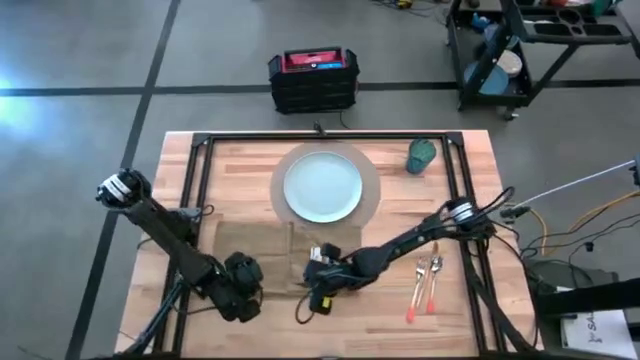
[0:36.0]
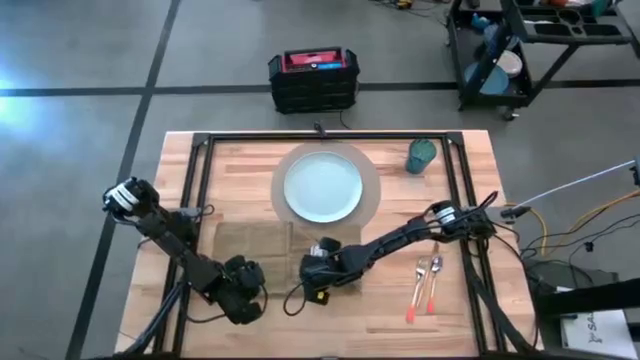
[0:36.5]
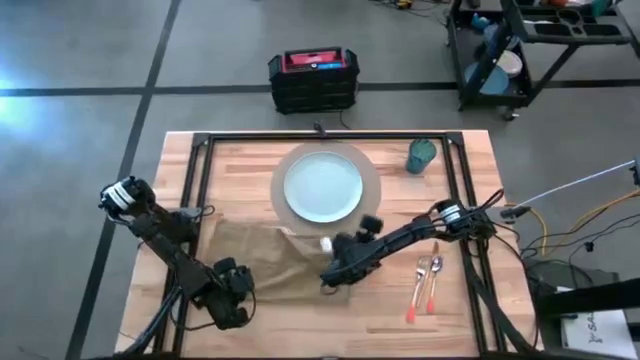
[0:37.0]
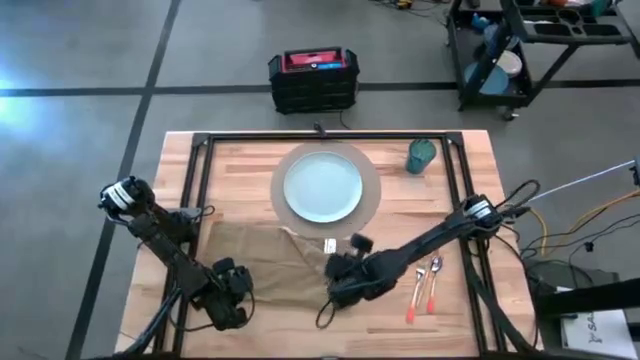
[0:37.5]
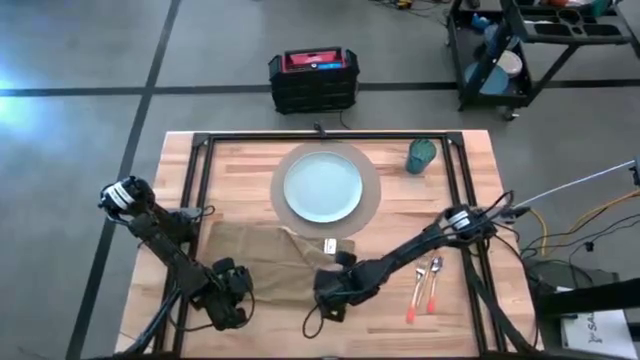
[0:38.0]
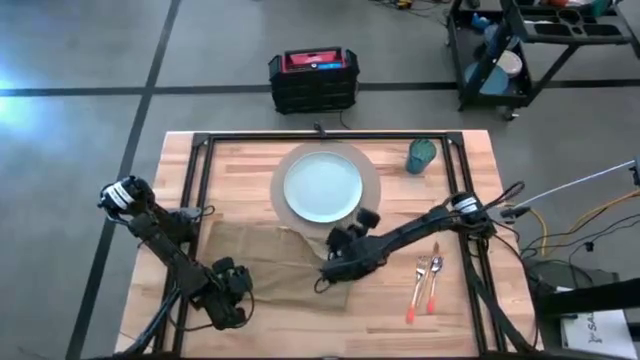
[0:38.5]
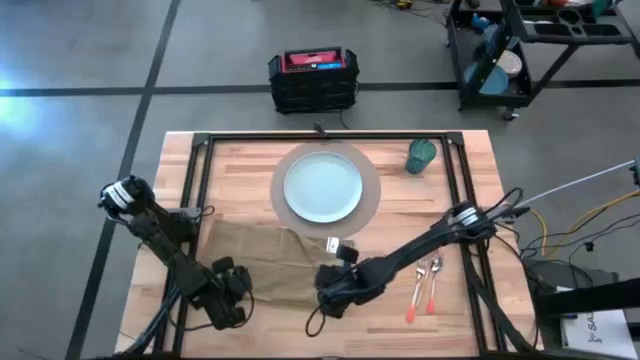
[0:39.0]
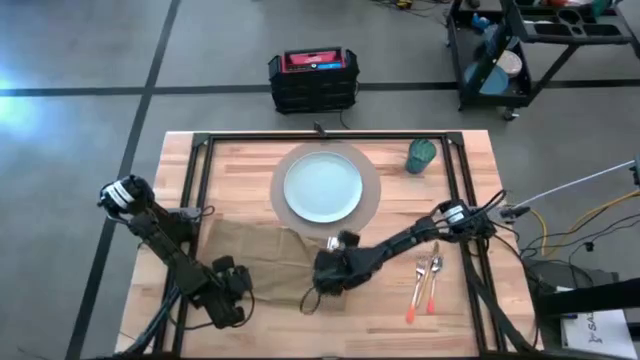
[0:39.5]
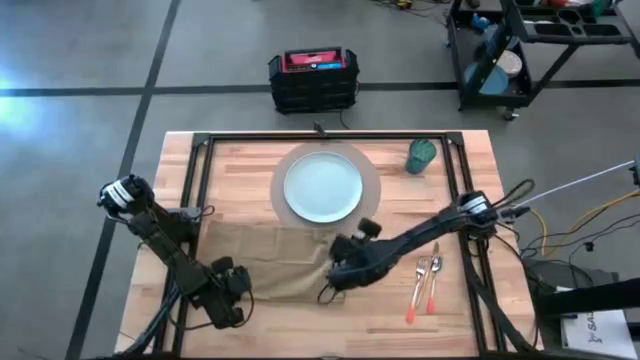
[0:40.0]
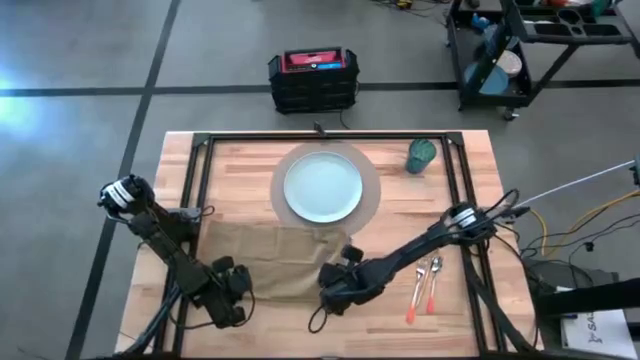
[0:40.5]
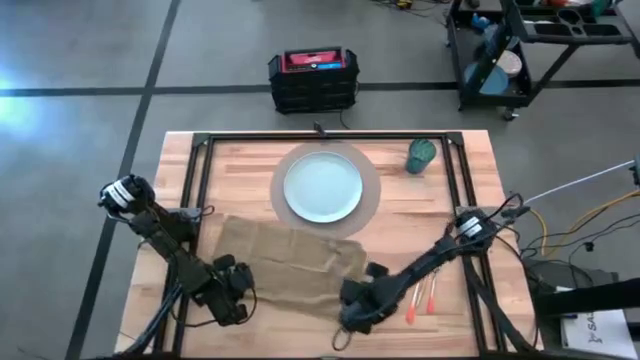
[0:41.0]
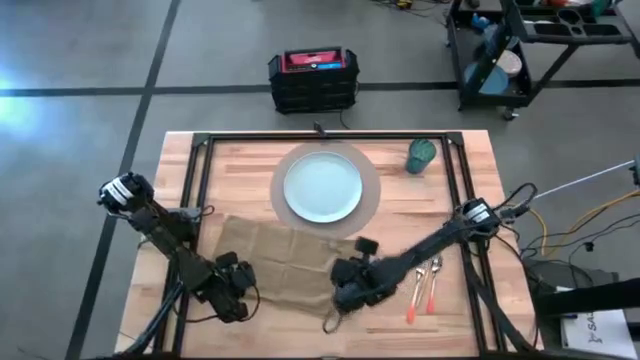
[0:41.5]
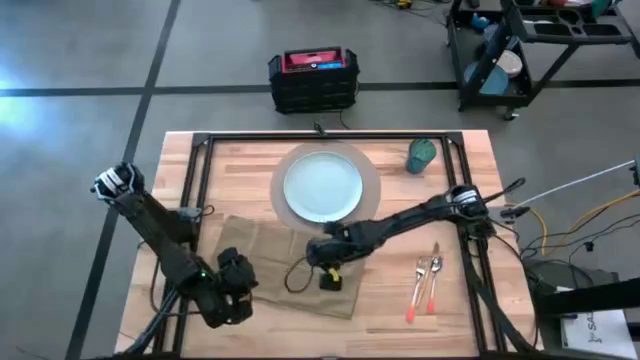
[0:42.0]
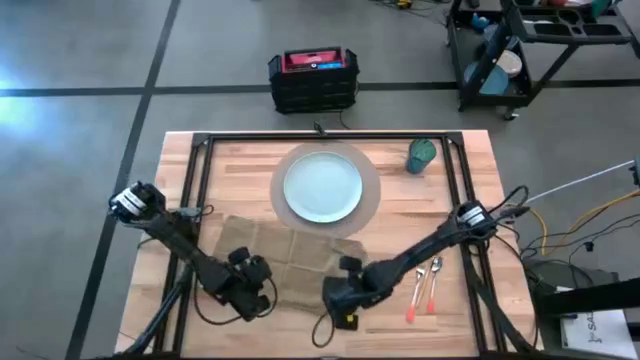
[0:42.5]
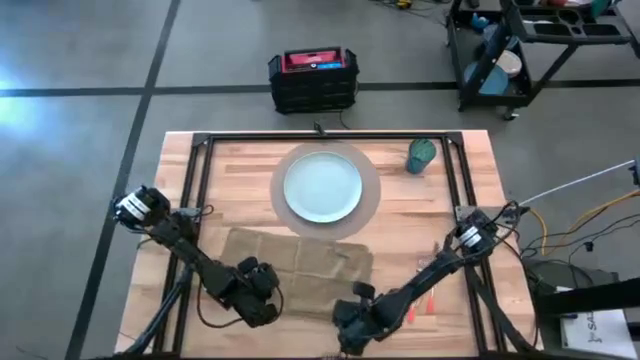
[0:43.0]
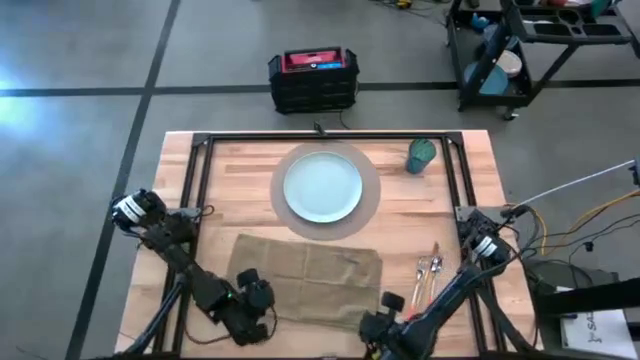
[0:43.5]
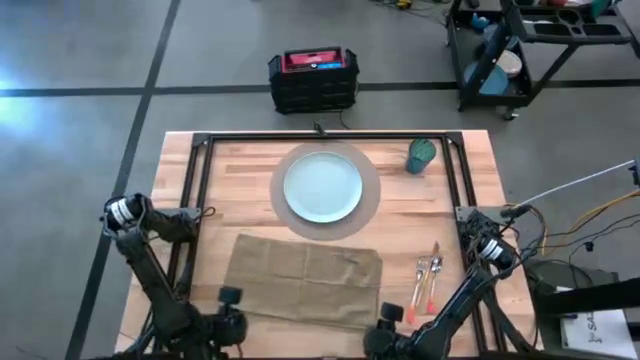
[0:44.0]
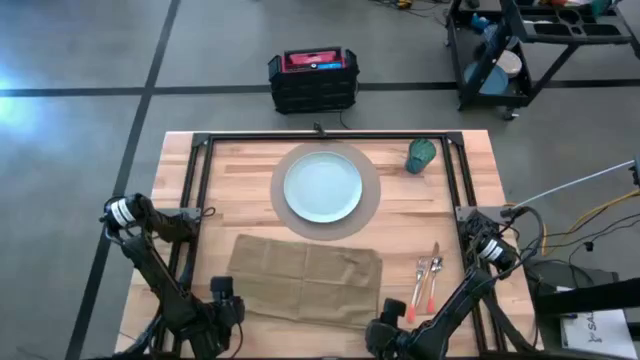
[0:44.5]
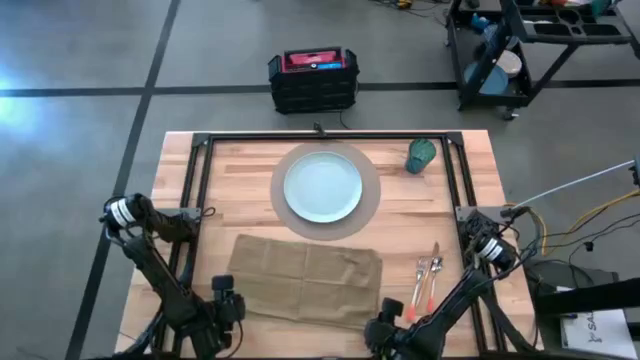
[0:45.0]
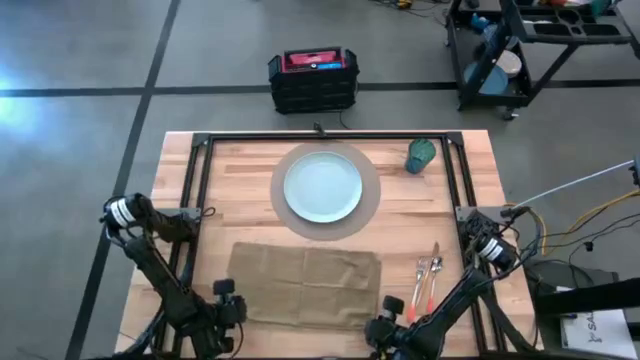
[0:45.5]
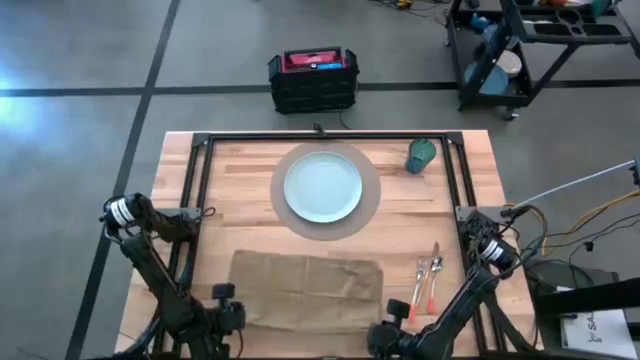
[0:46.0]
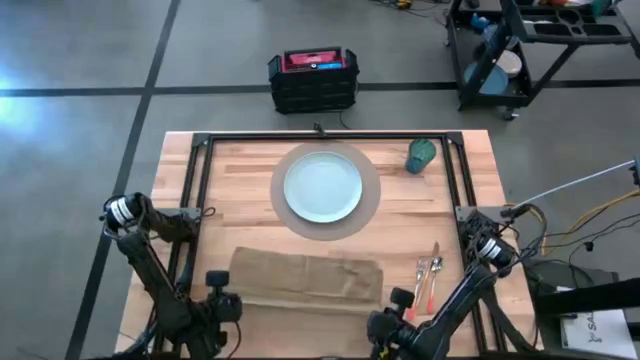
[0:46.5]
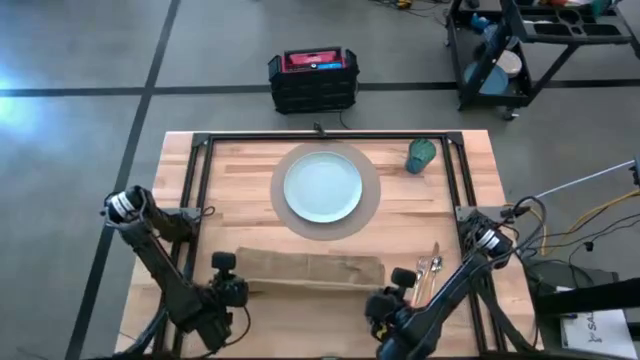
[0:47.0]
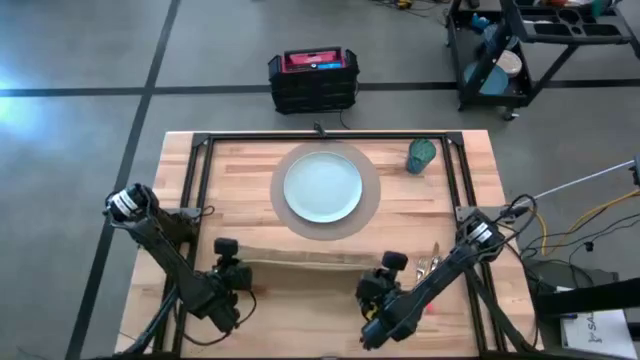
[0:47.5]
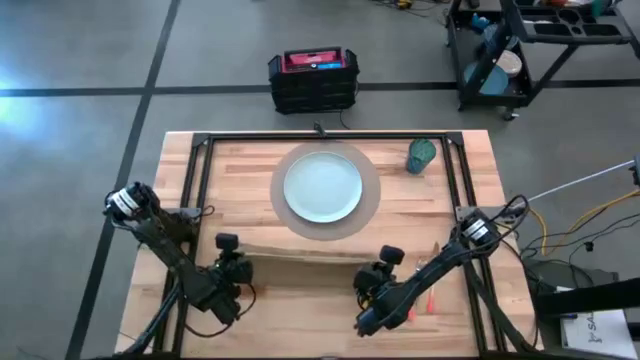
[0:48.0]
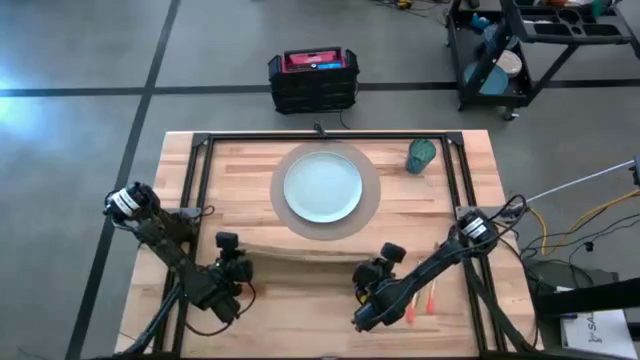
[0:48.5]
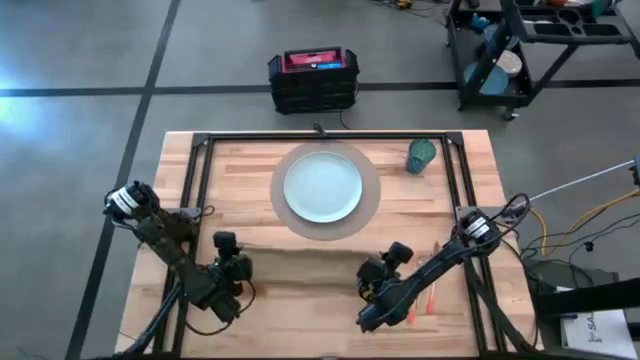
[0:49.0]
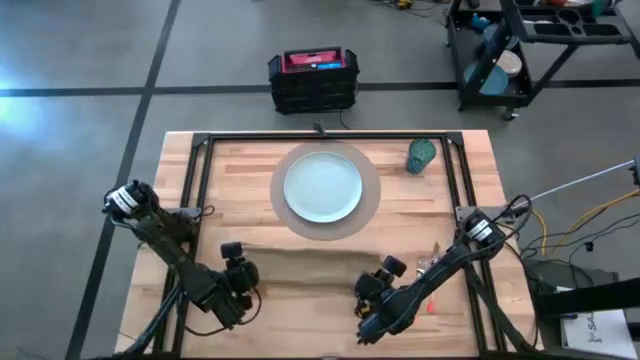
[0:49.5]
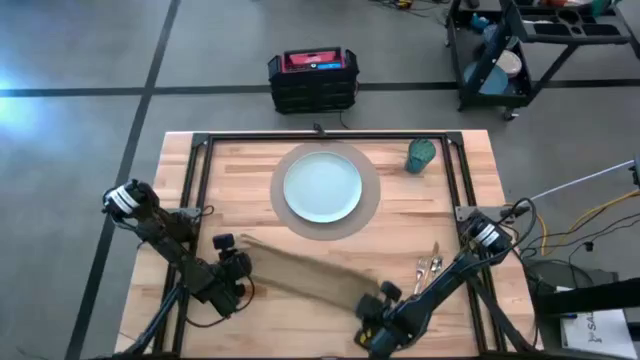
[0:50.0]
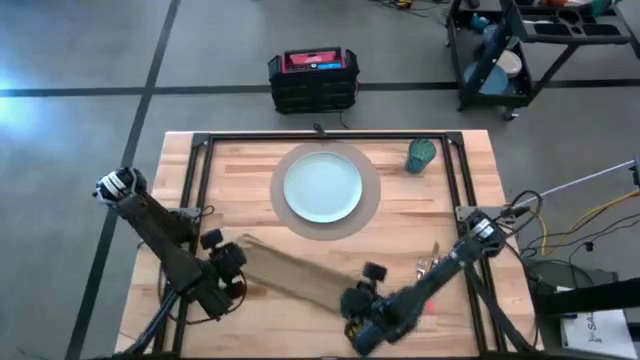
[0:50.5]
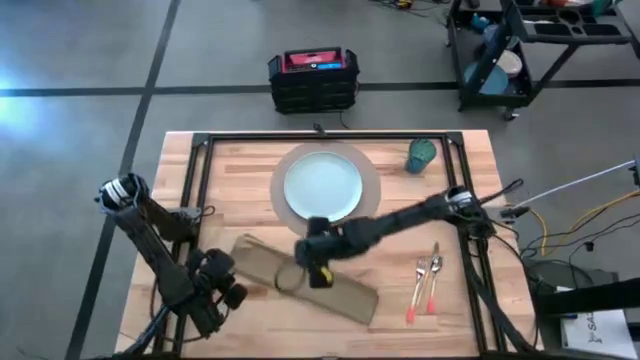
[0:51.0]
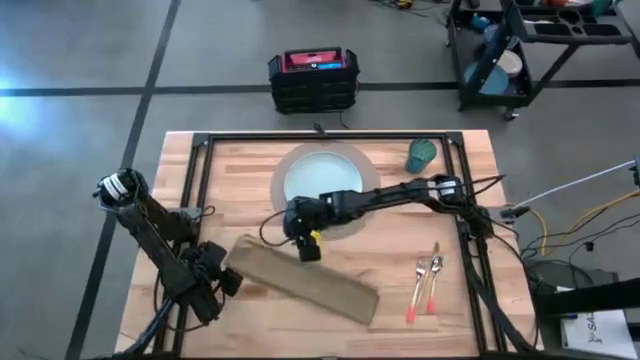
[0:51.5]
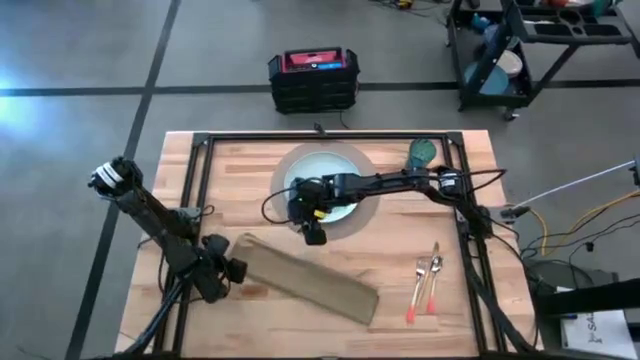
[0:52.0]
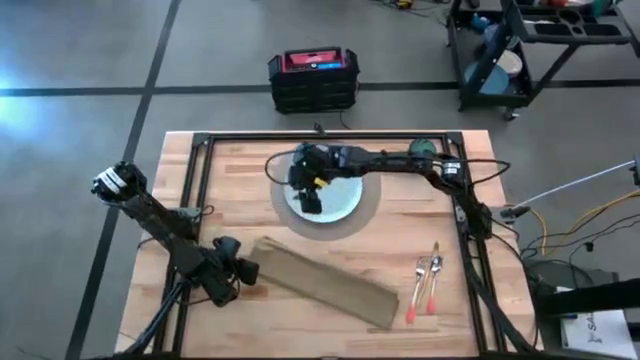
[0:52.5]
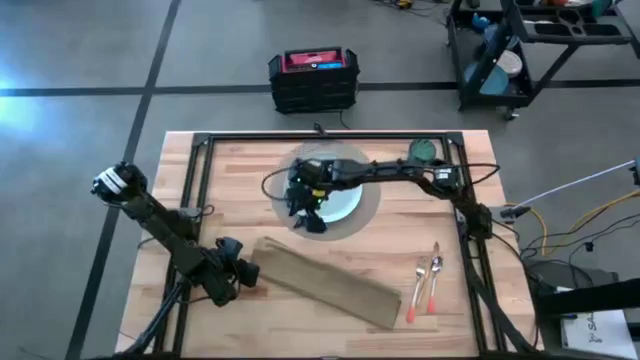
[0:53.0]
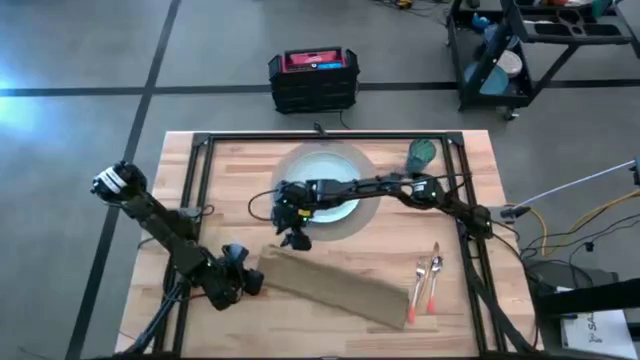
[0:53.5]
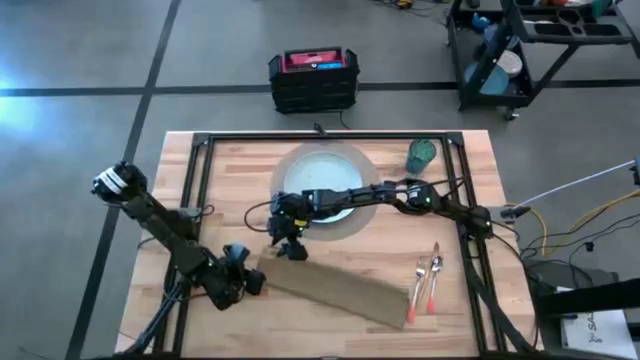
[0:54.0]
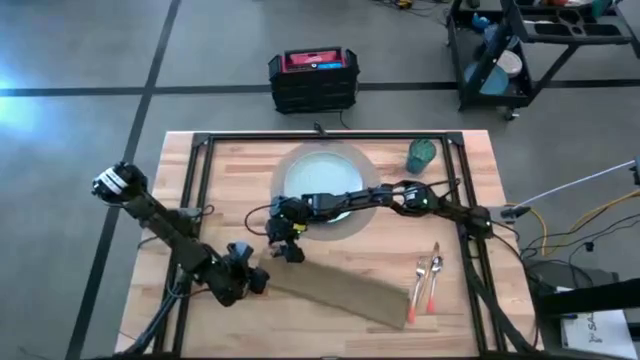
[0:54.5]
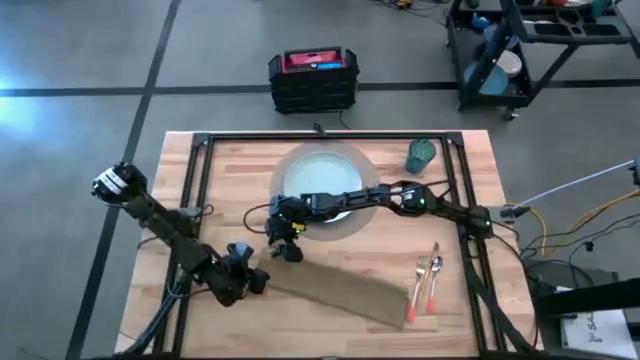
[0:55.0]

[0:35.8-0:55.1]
Task: Set table place
Fold the brown table napkin
